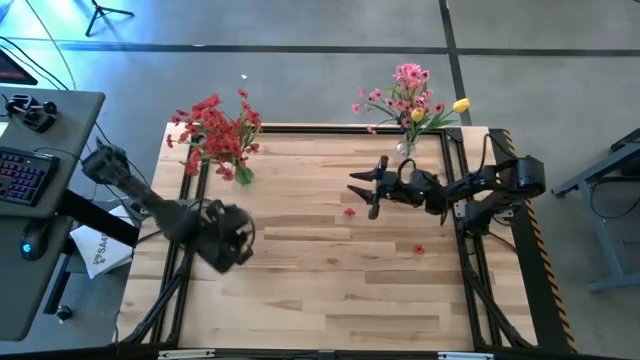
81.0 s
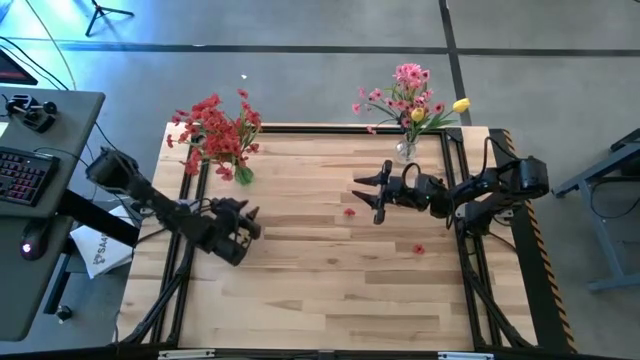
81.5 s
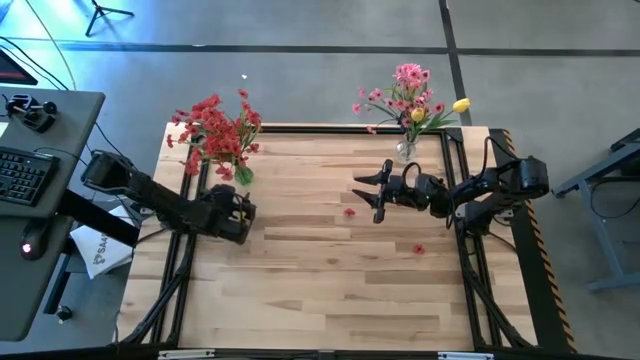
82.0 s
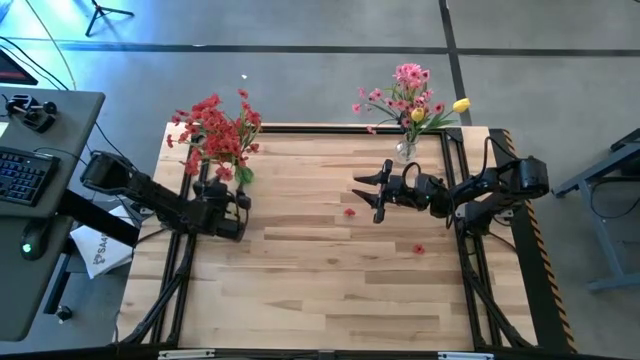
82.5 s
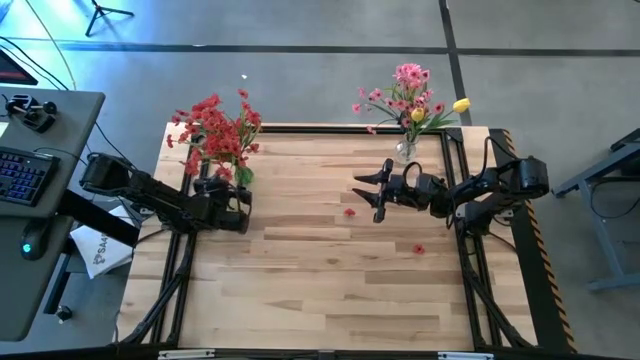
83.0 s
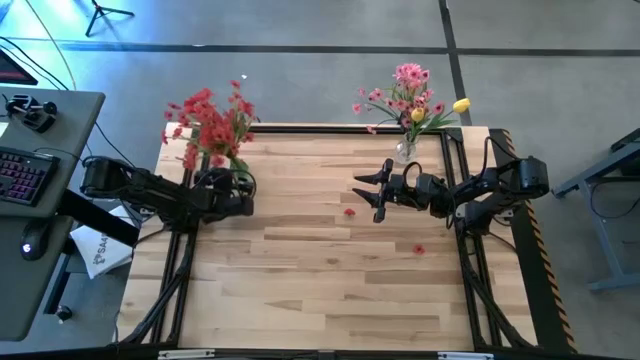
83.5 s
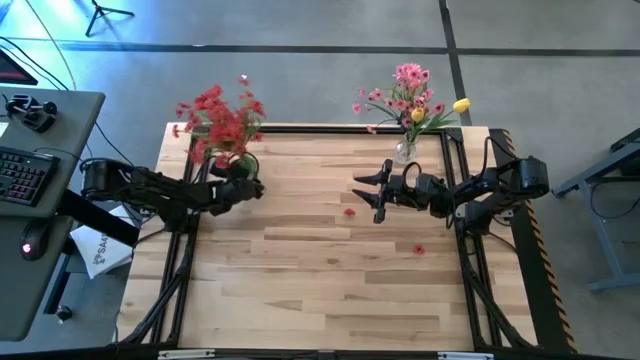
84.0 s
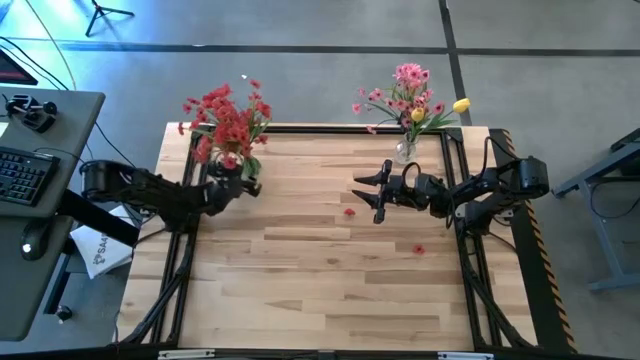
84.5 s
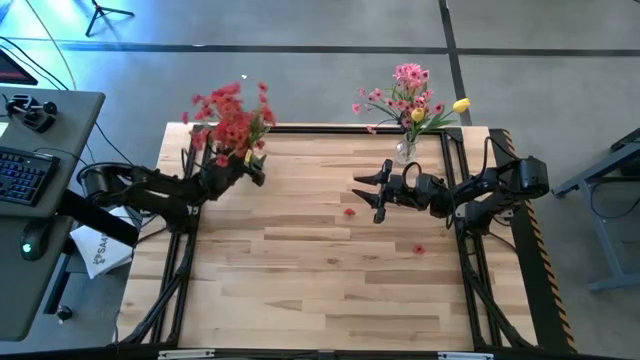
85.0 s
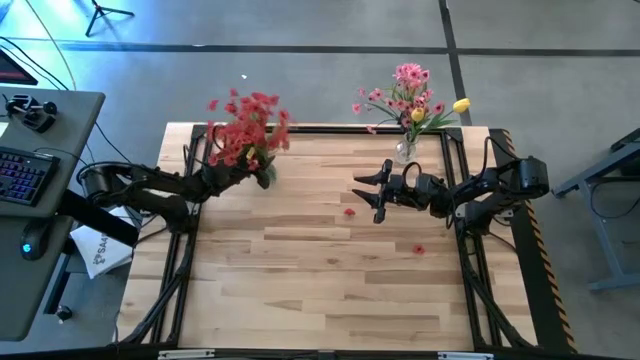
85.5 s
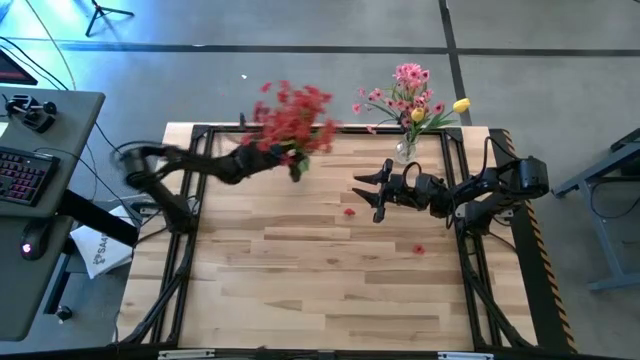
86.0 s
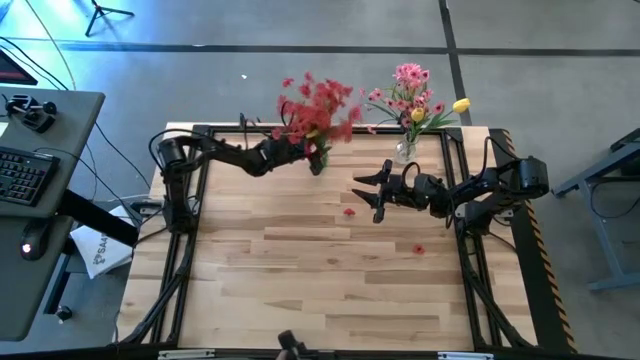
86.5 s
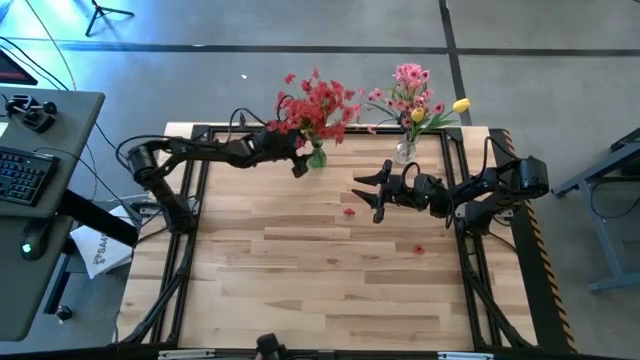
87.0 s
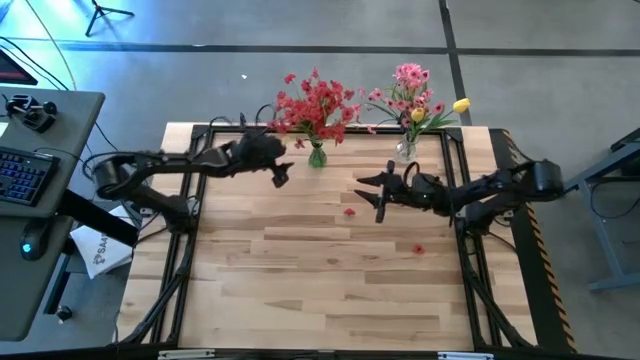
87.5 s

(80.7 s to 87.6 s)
Task: Sort flowers into vase by color
Adjust the green vase from the left to the center of the table

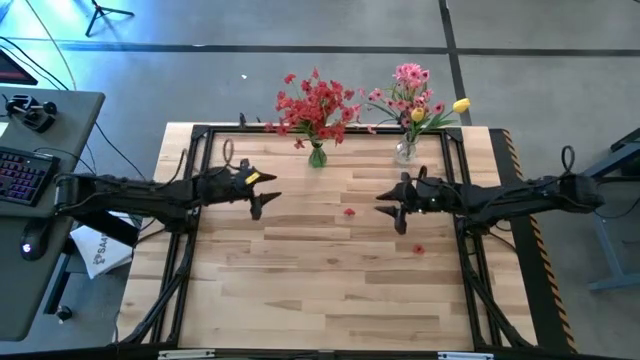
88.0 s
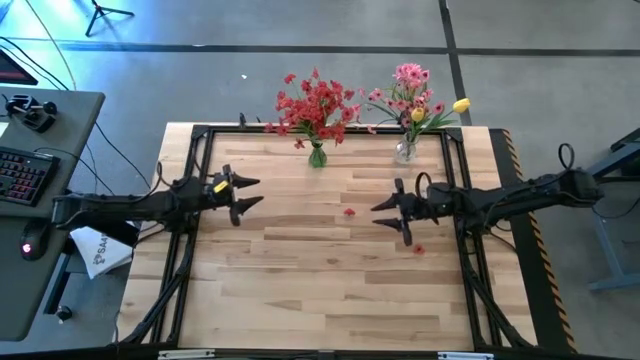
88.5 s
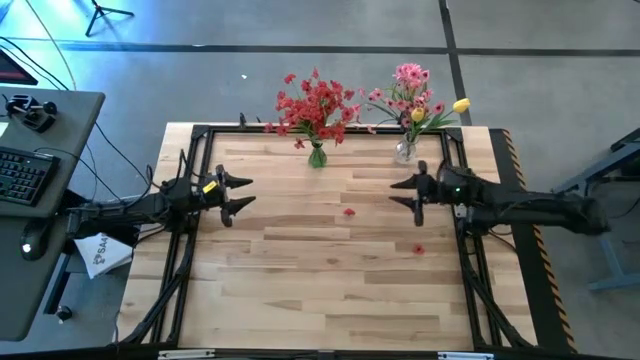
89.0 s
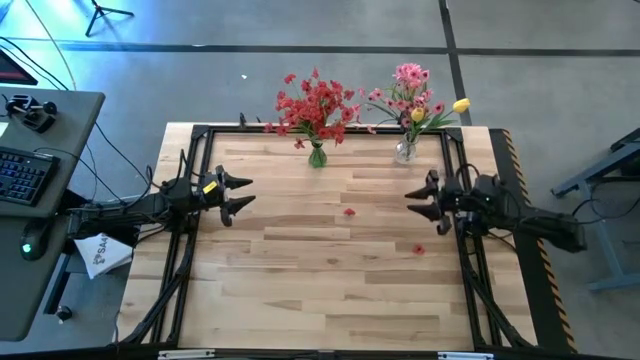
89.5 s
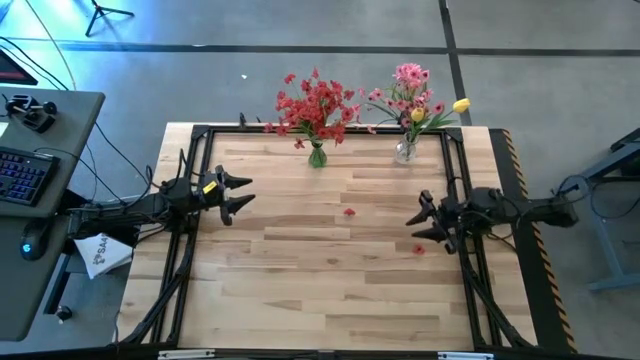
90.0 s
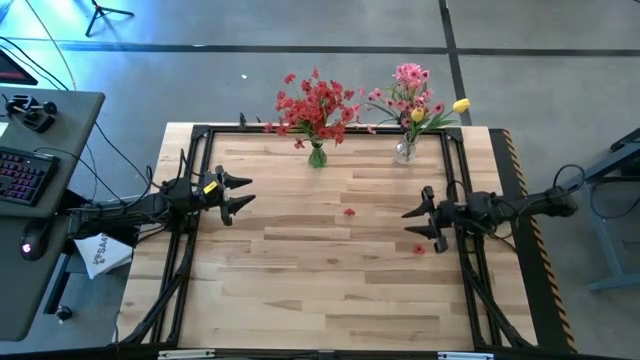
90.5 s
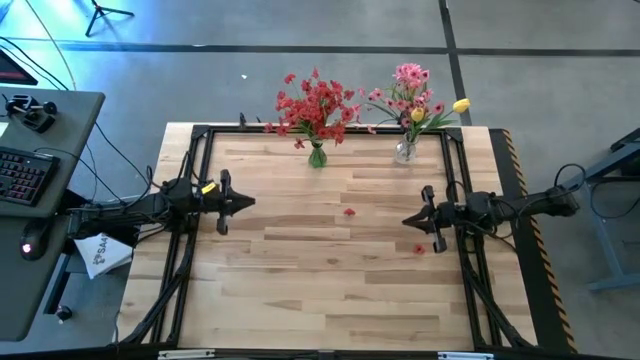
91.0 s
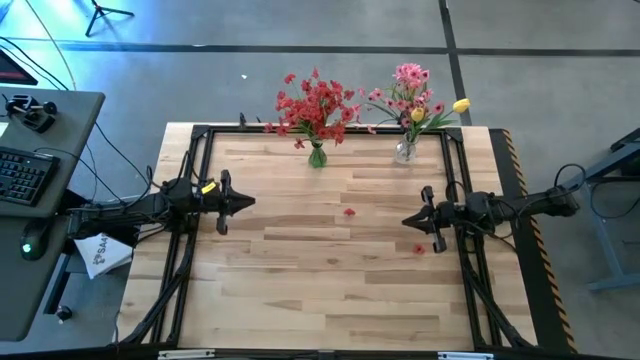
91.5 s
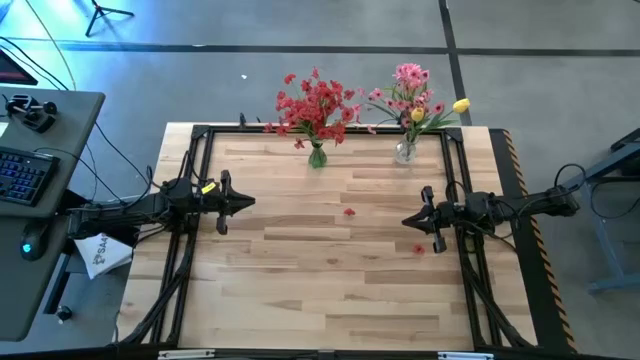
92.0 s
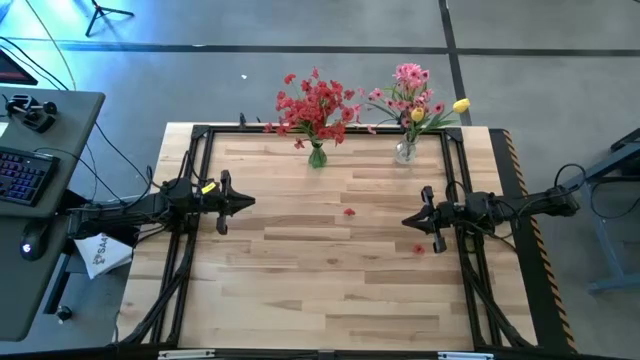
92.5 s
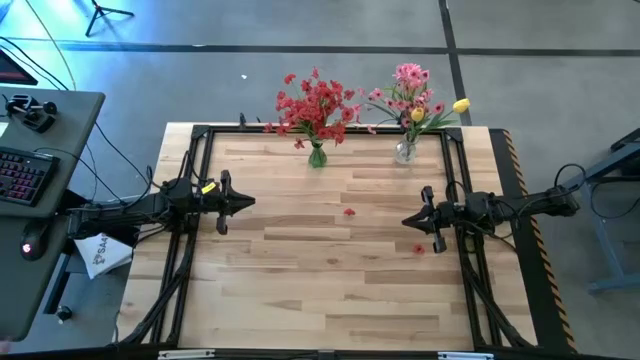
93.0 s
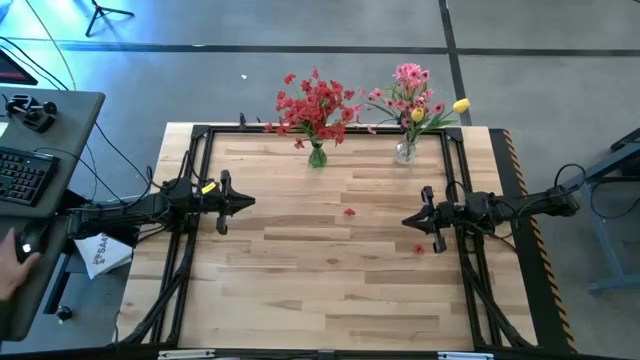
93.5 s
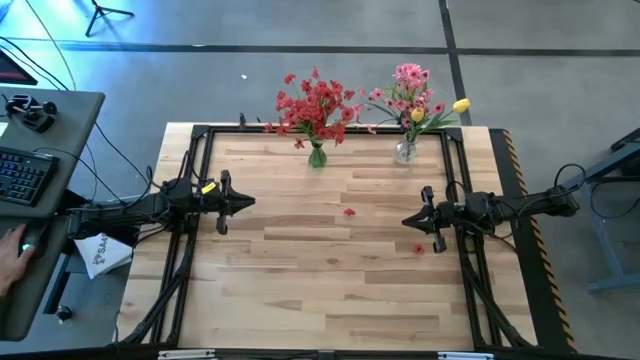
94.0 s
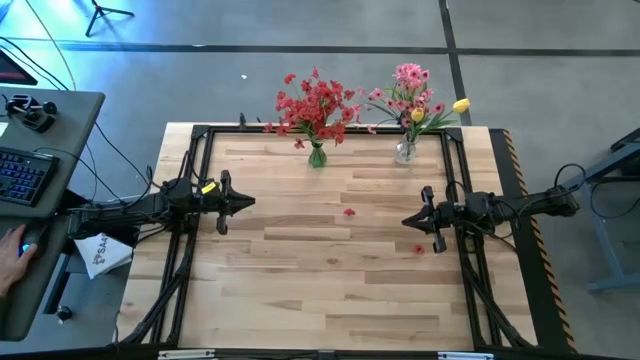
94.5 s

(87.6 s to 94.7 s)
Return to home position
